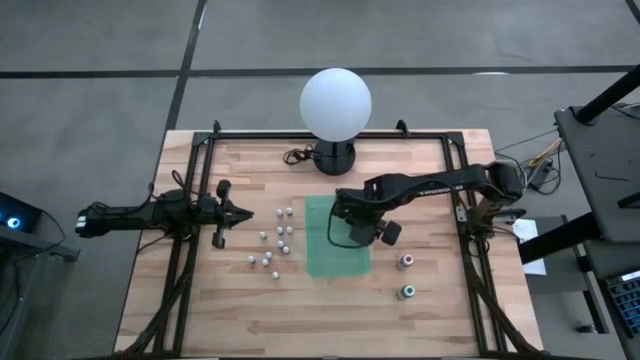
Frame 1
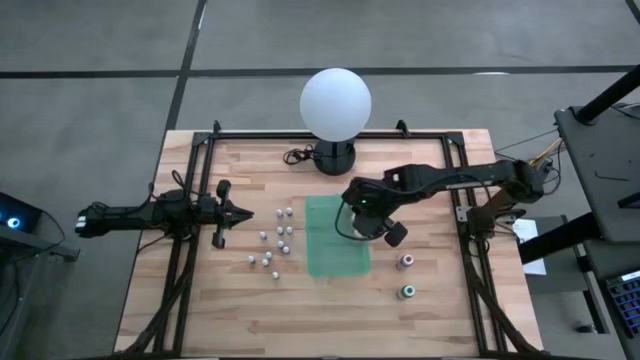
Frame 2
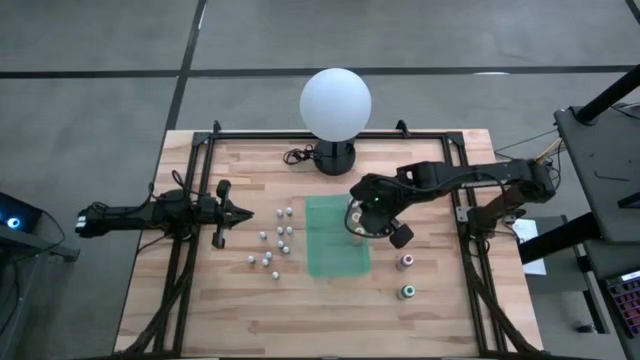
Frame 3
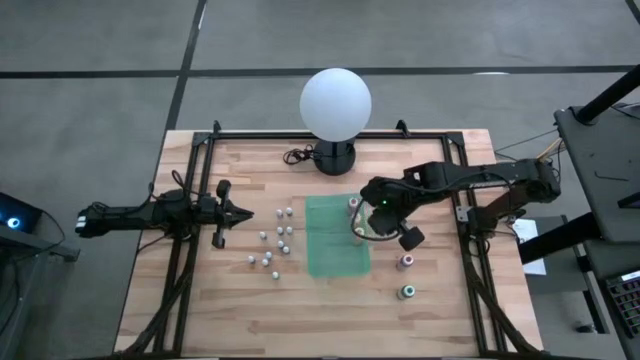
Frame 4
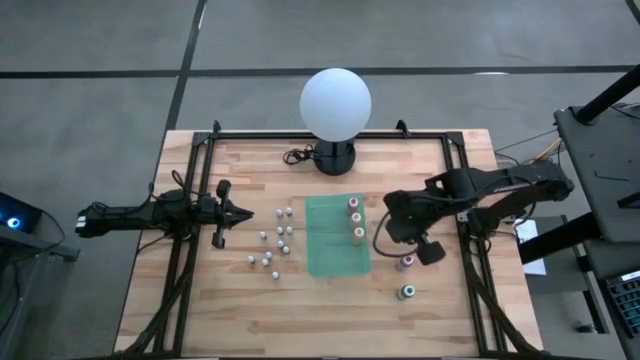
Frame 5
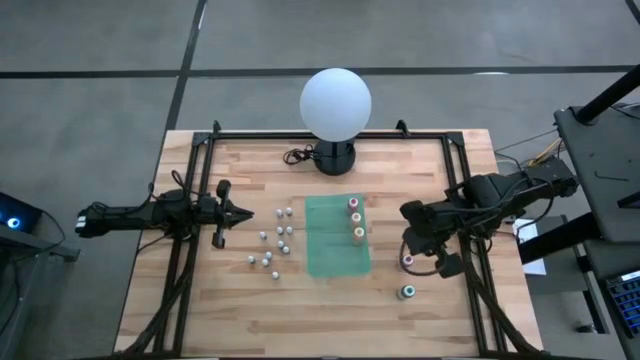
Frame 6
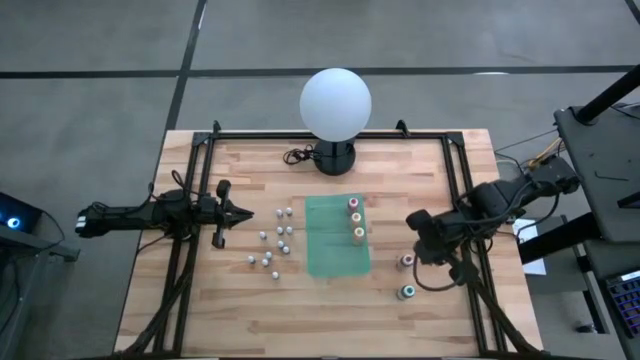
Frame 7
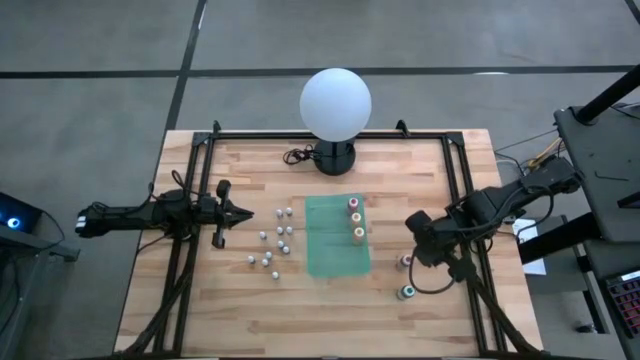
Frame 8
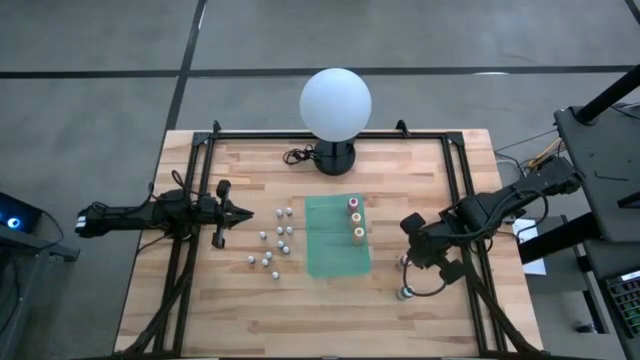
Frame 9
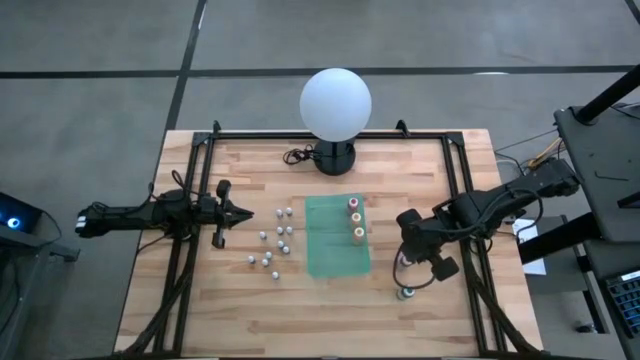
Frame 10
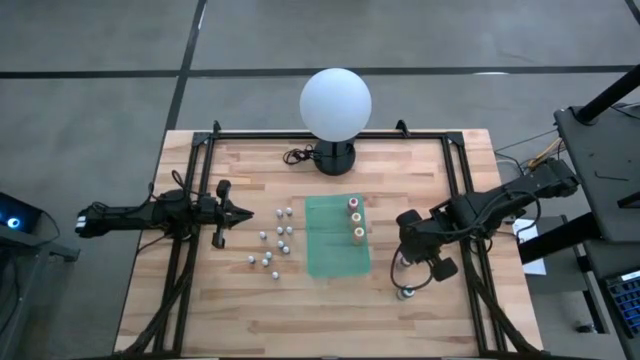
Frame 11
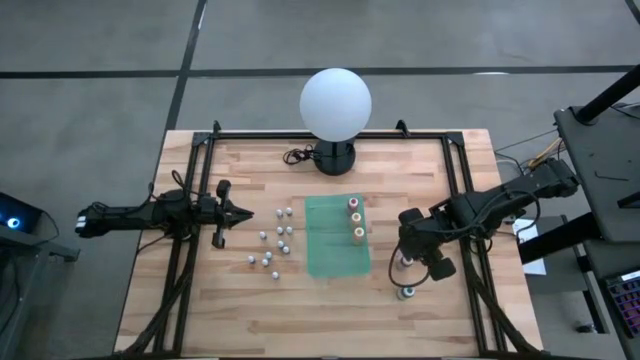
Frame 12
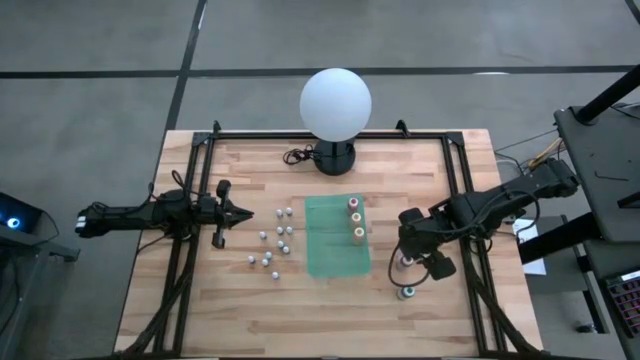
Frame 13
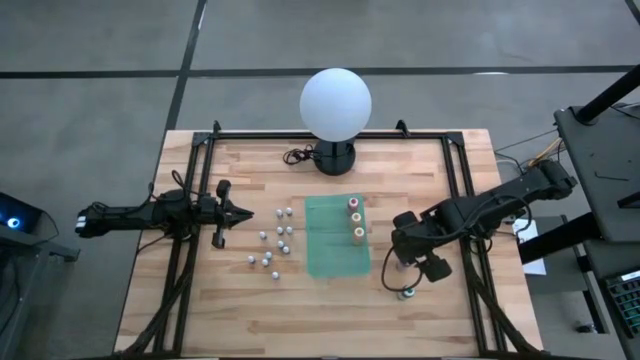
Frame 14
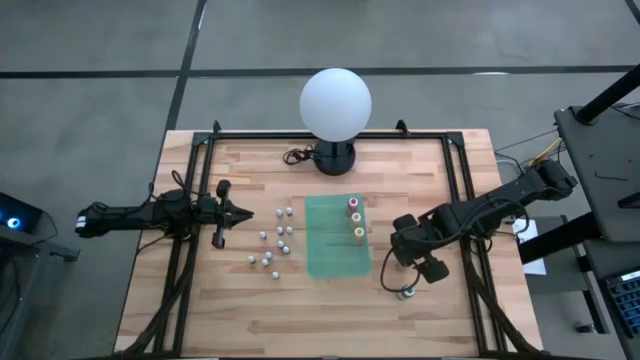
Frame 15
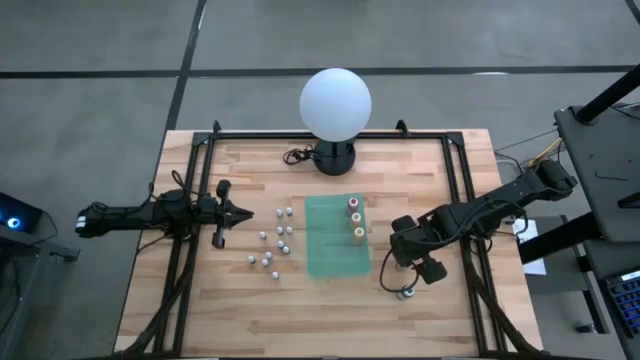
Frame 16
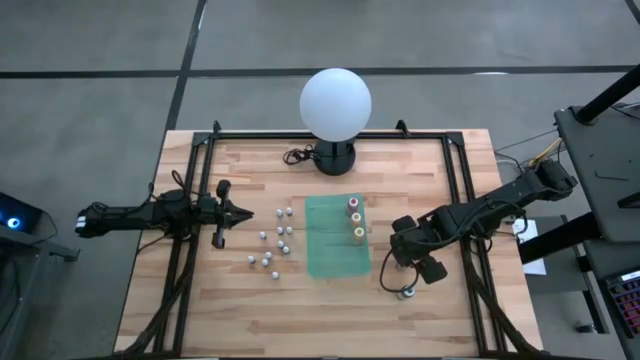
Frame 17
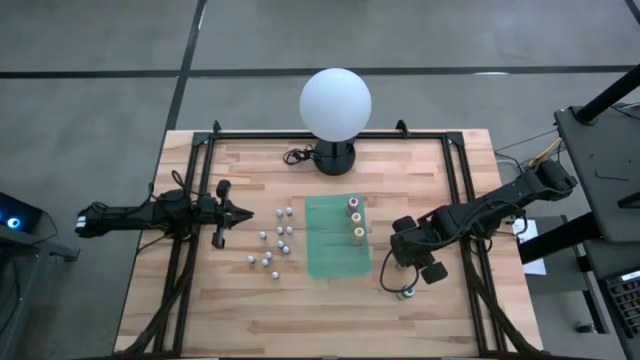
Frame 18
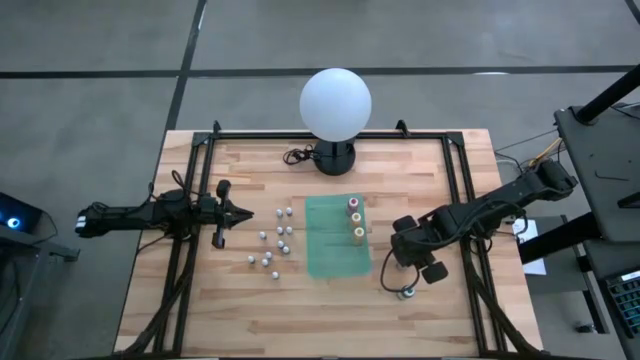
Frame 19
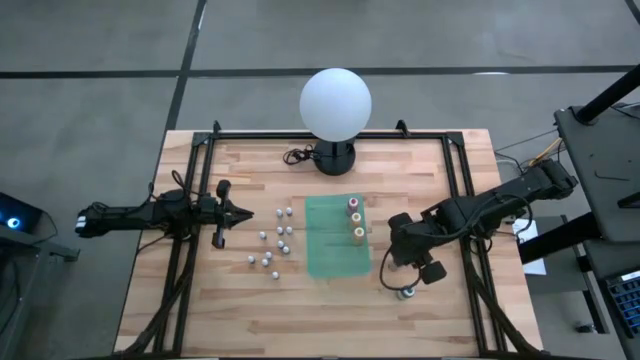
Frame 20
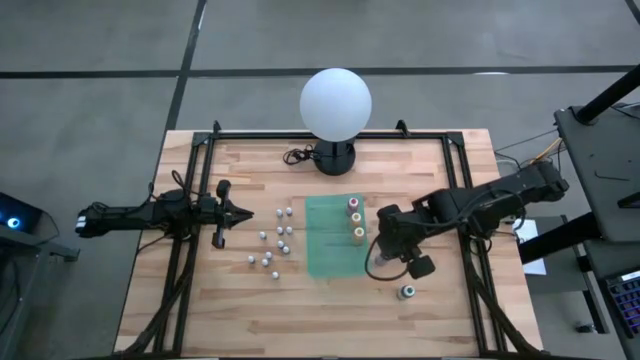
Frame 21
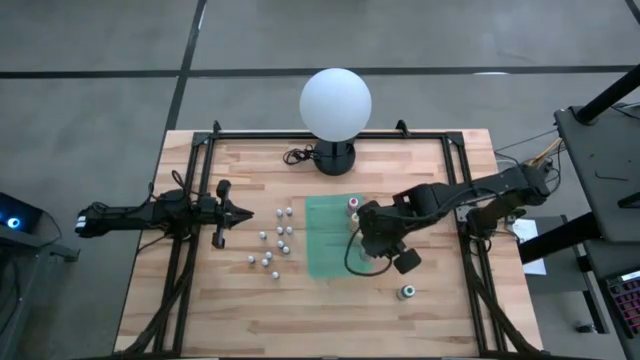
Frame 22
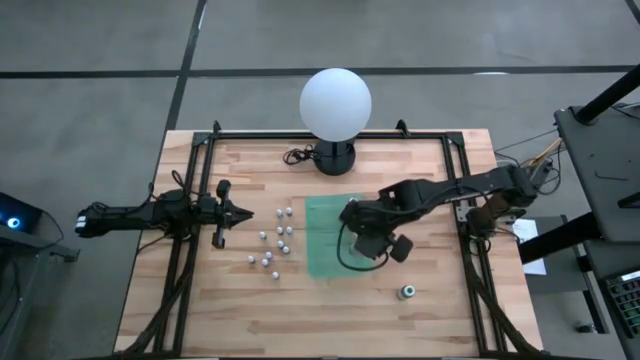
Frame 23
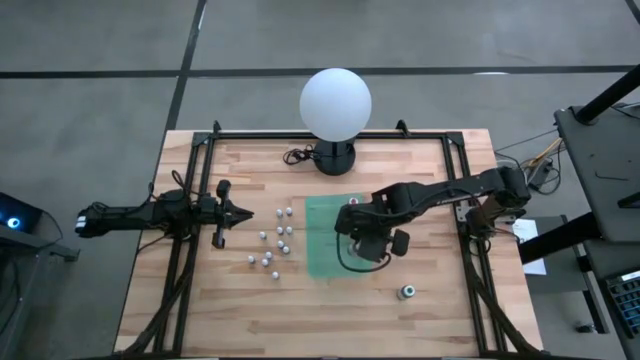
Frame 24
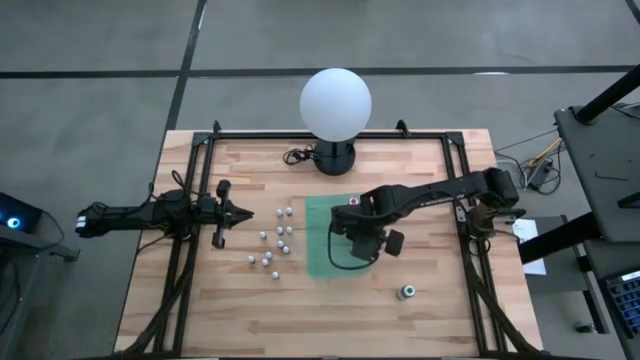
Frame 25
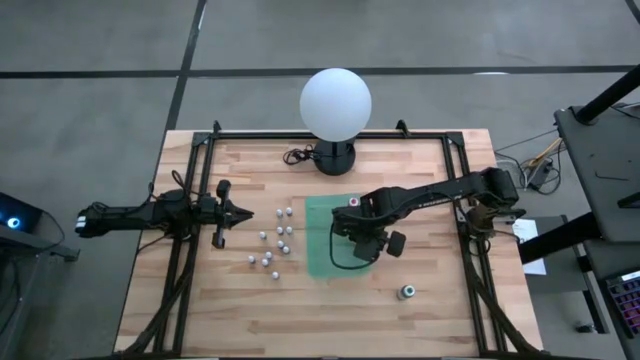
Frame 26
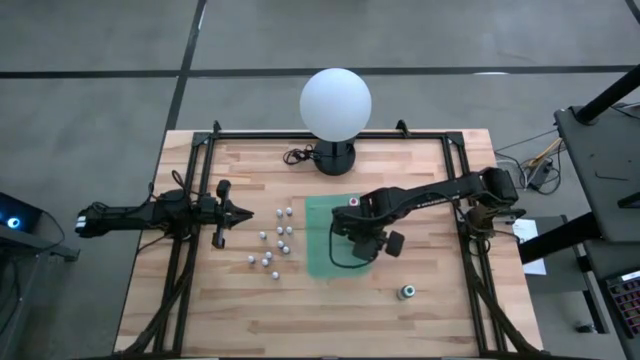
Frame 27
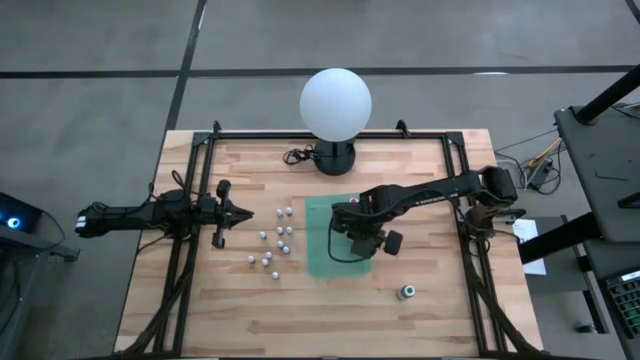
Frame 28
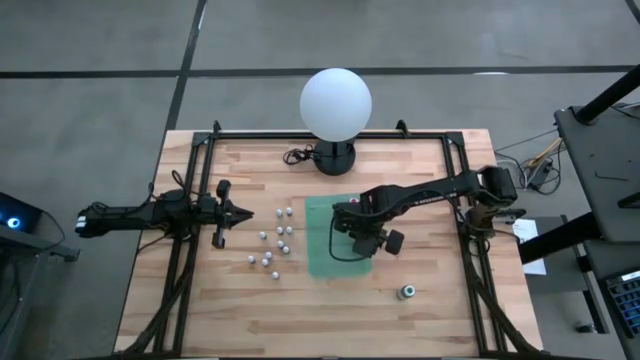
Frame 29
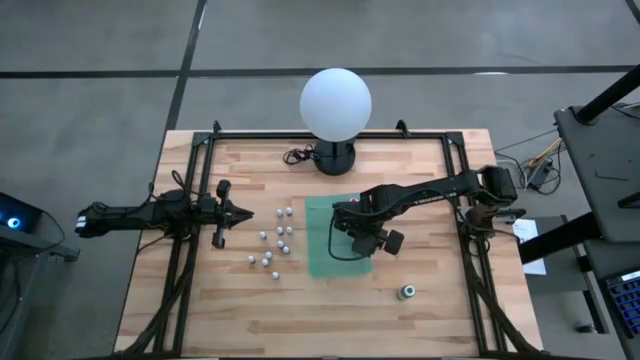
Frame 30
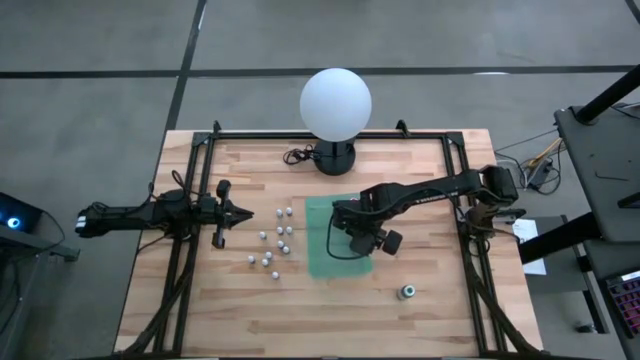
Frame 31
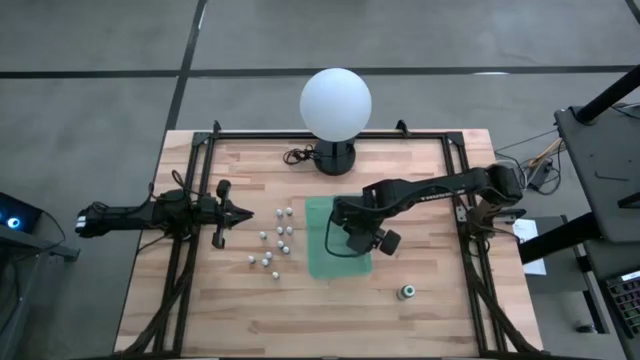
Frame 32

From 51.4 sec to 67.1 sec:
Task: Pick & Place food coloring
Put the large red food coloring bottle into the green bin

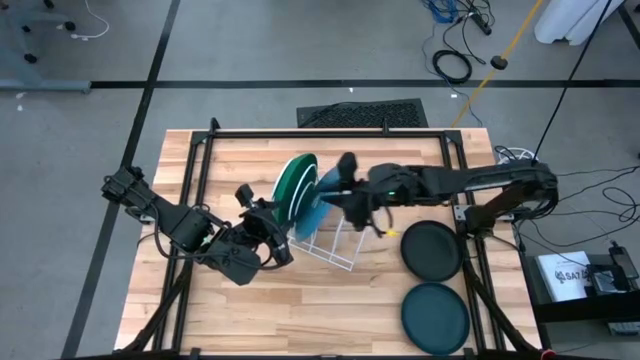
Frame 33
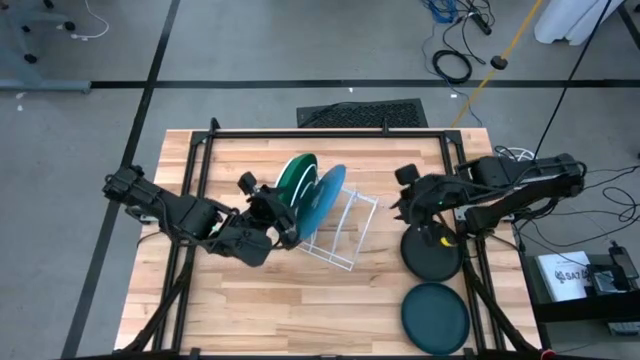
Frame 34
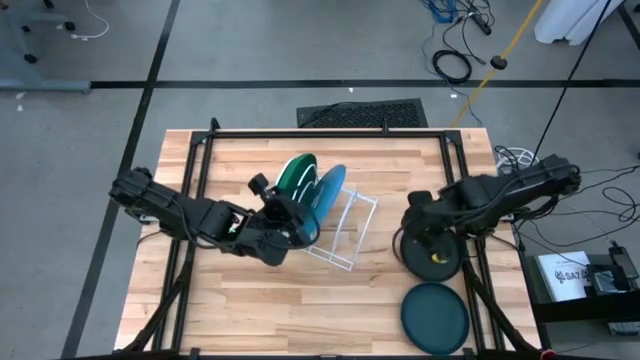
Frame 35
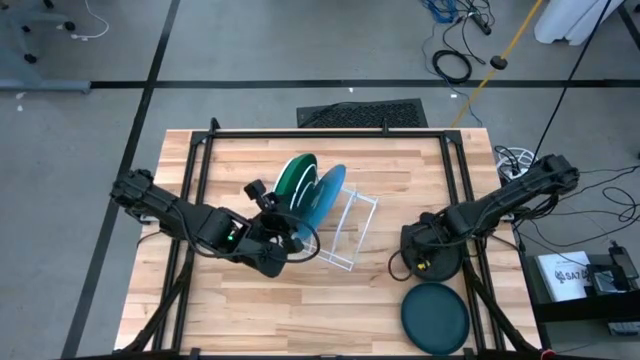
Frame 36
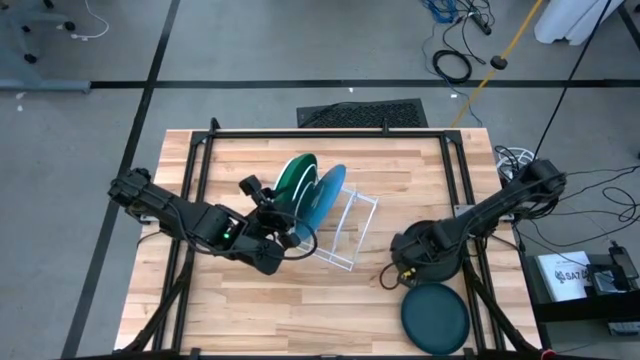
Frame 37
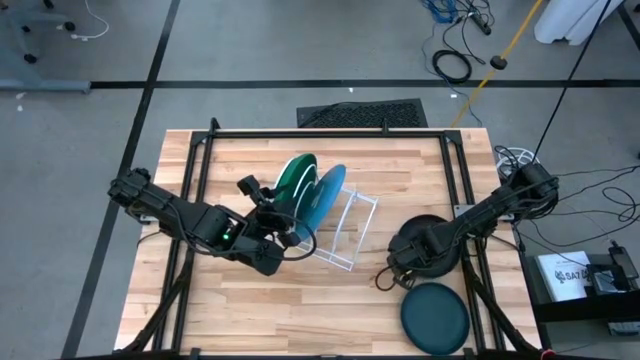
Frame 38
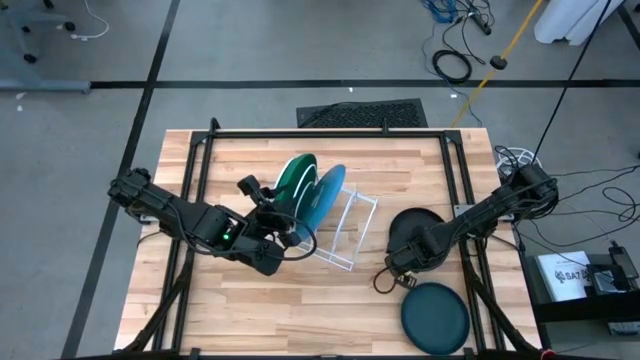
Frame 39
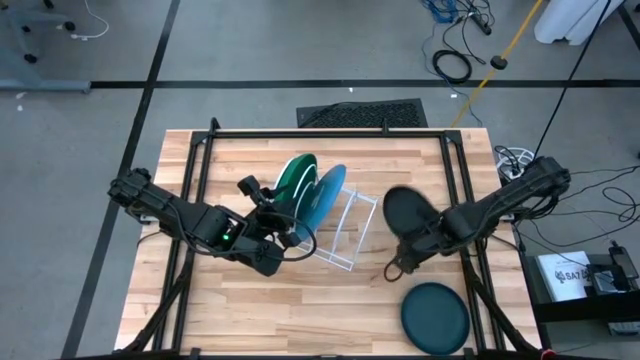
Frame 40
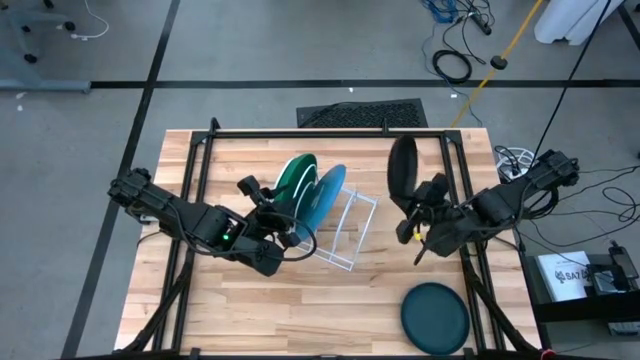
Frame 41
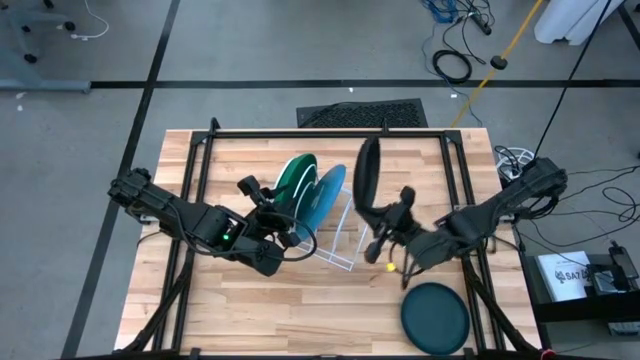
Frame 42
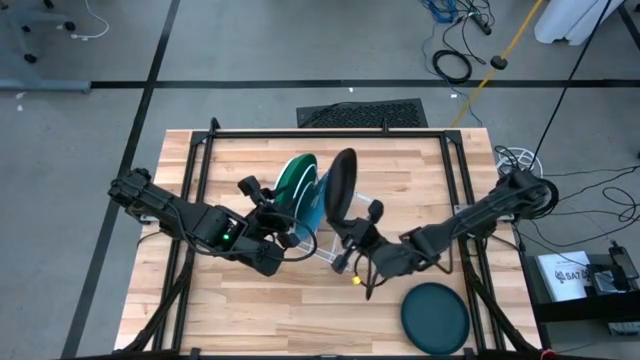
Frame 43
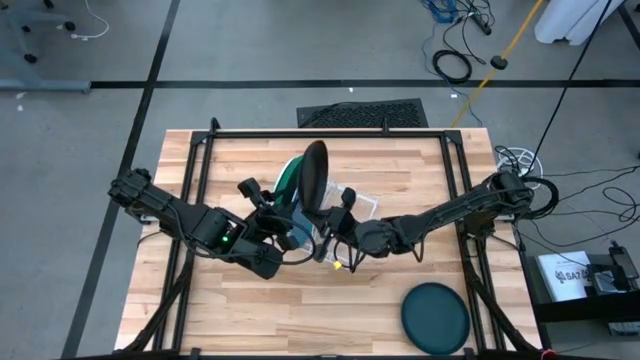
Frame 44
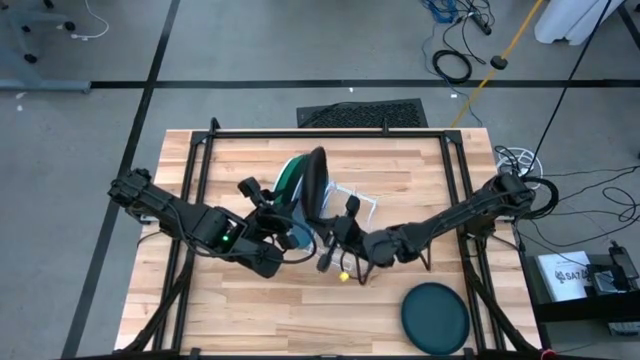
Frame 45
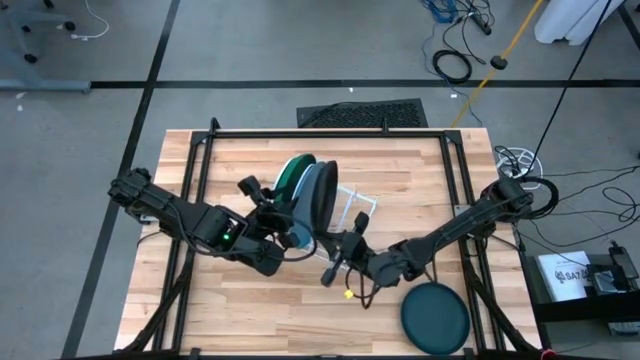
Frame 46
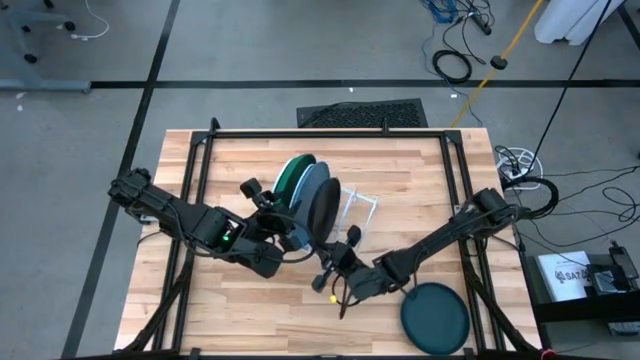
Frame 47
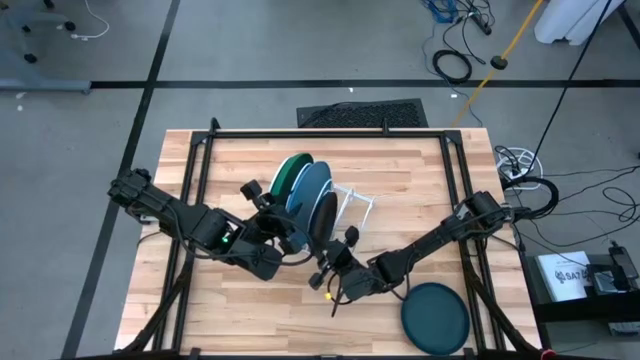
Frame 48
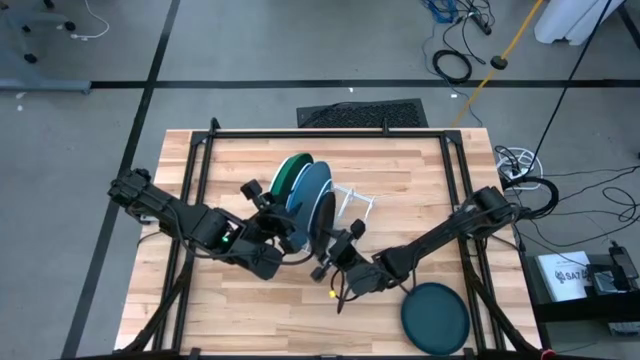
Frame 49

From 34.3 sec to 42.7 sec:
Task: Sort dishes
Put the black plate in the dish rack
